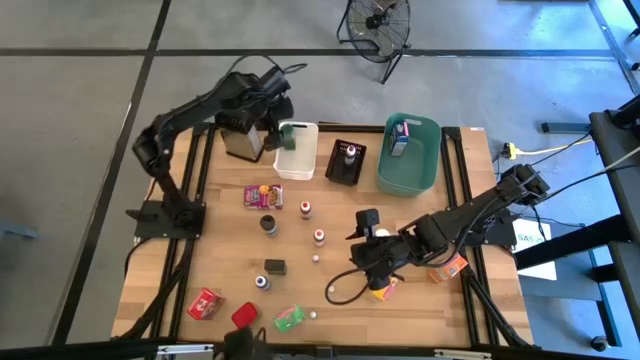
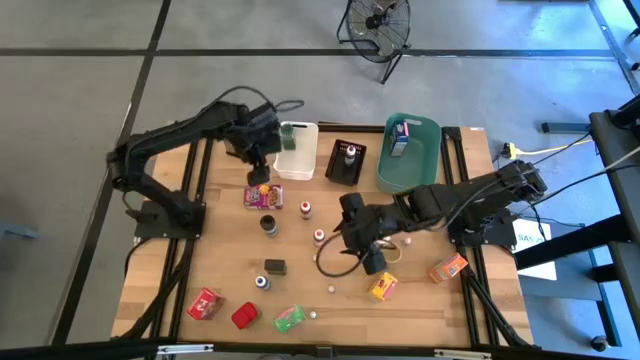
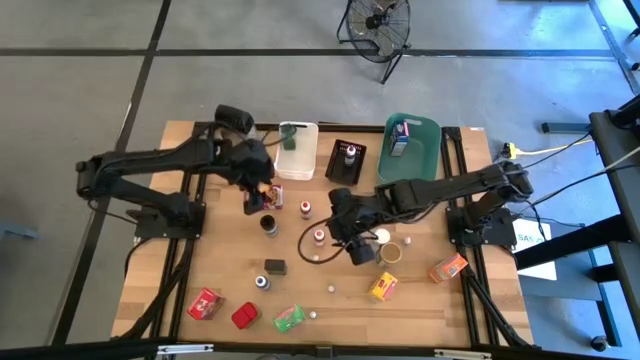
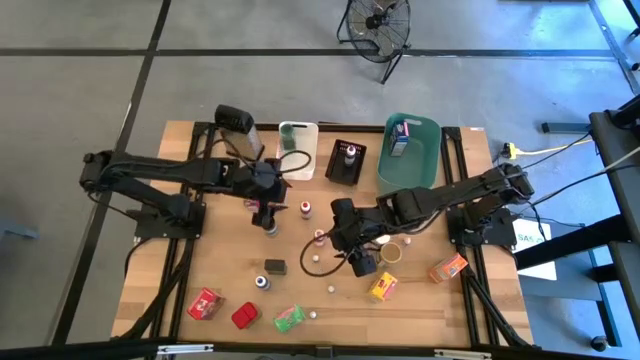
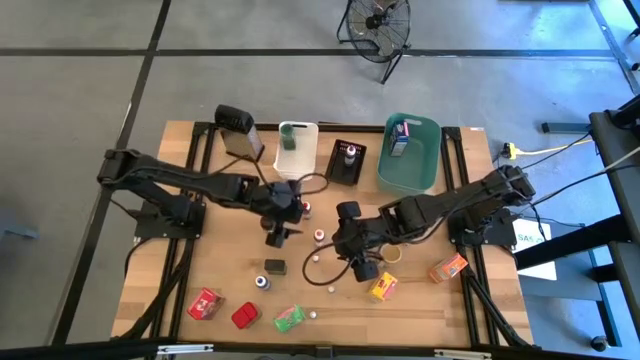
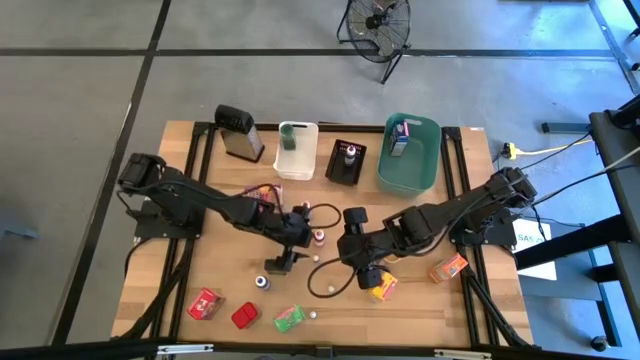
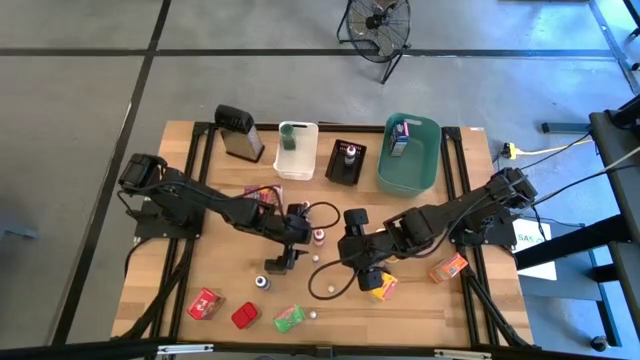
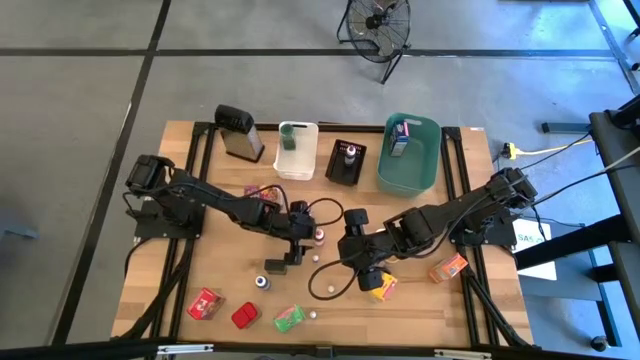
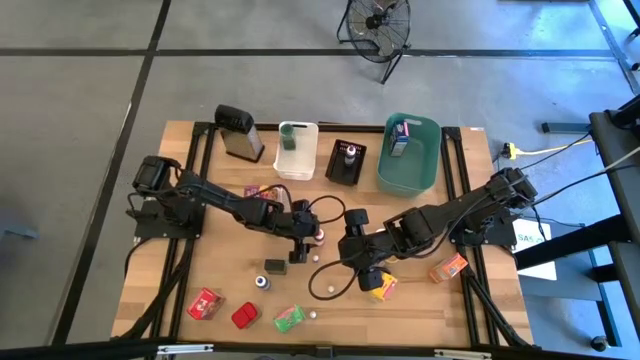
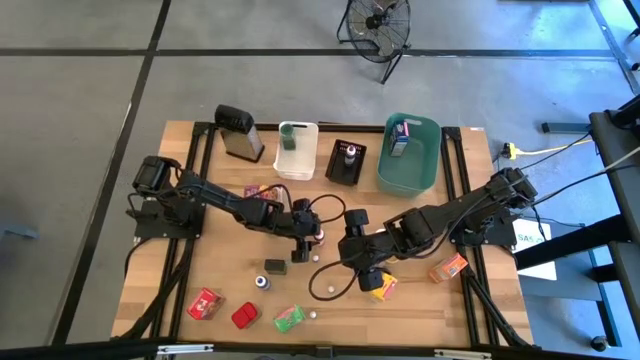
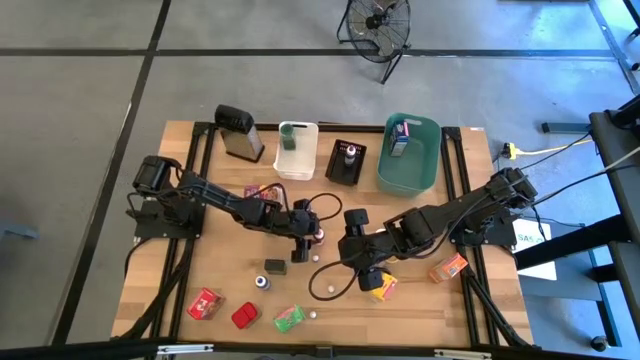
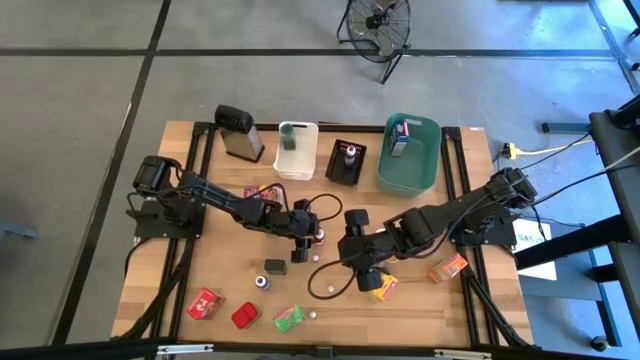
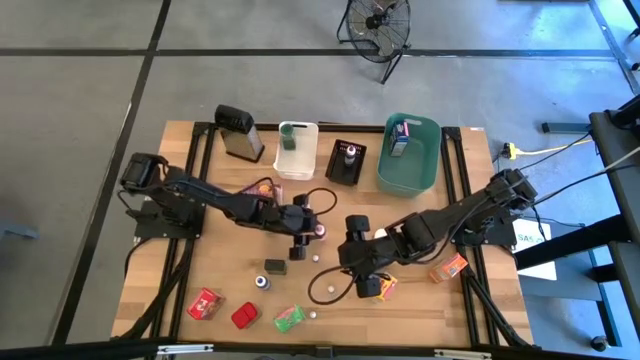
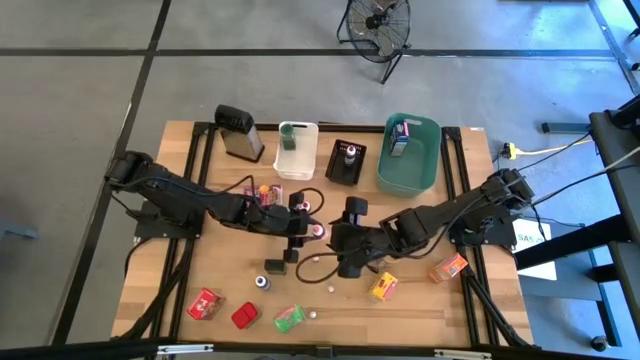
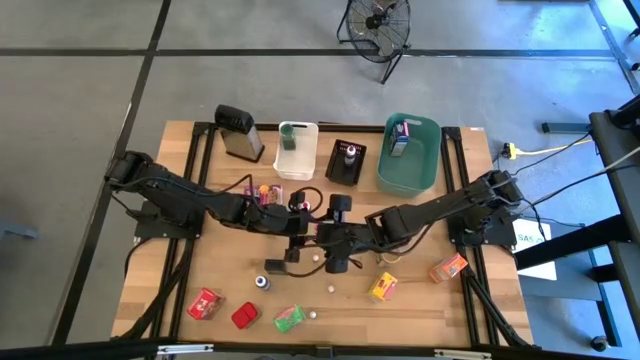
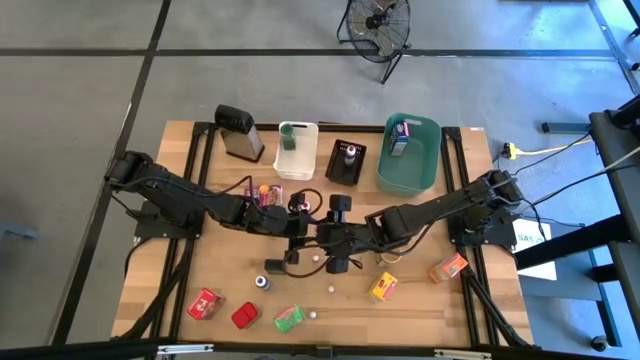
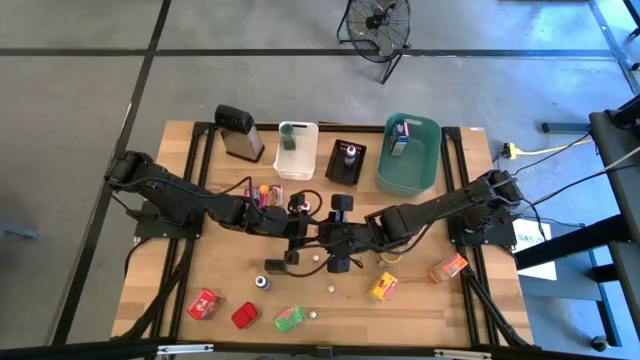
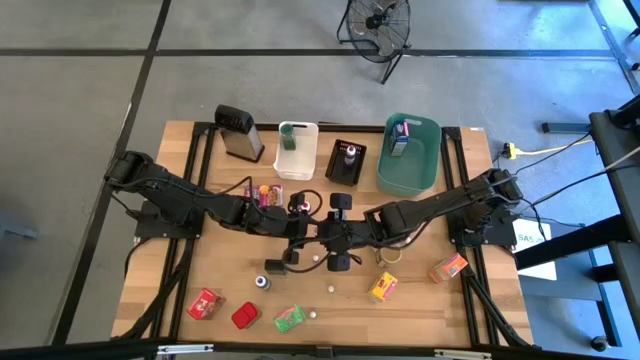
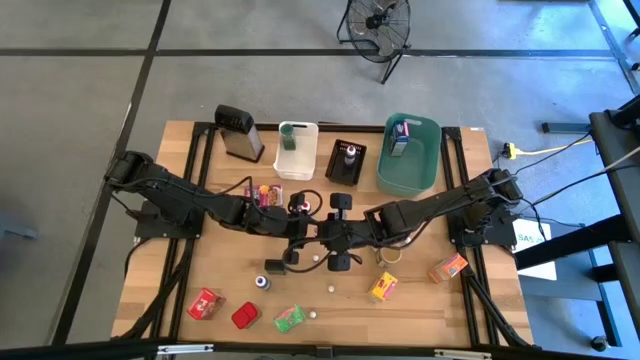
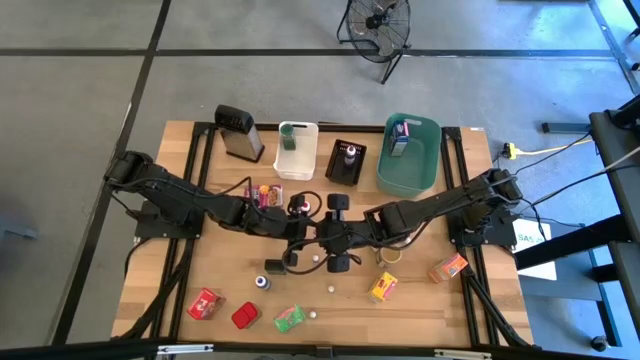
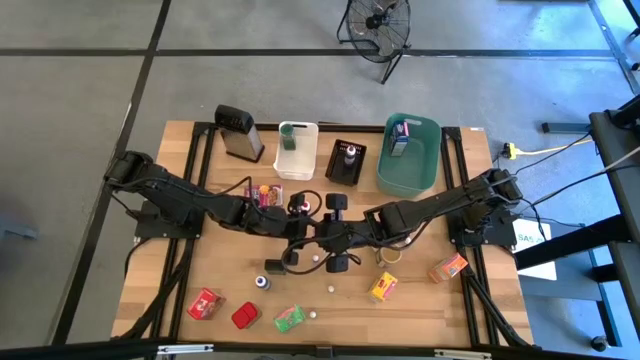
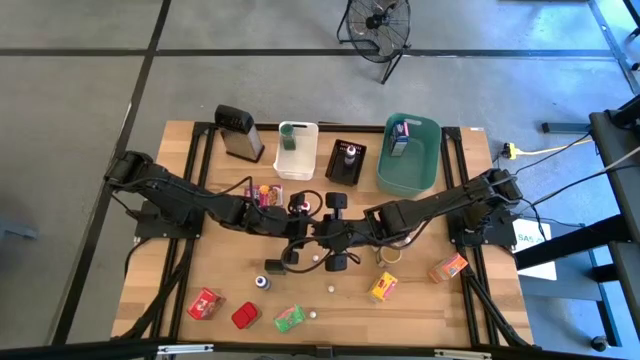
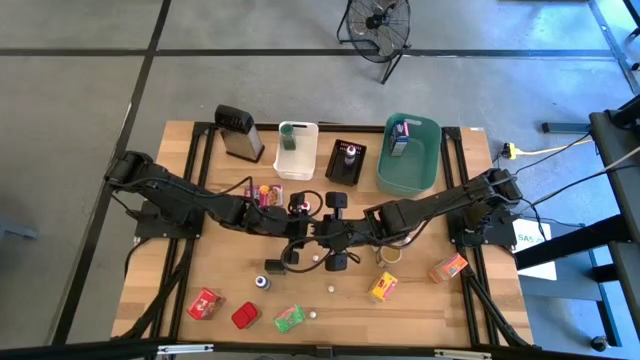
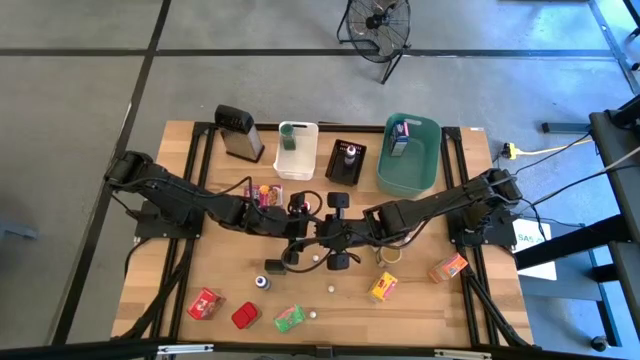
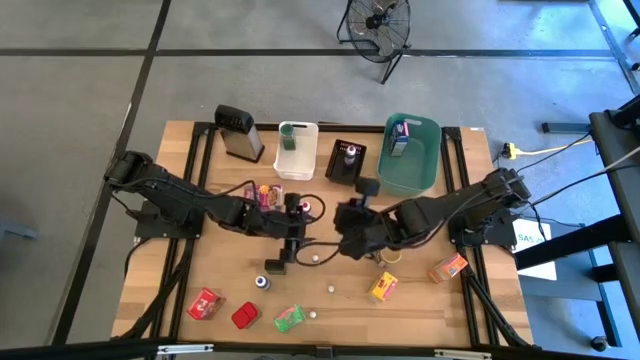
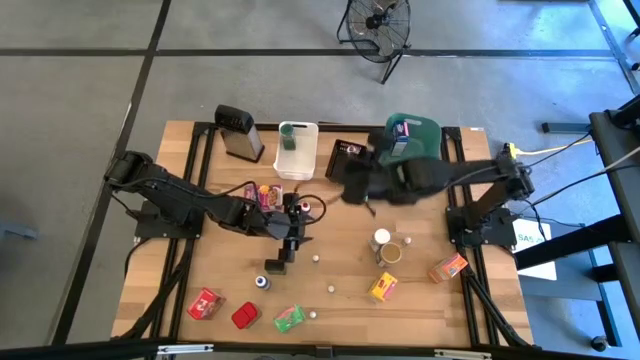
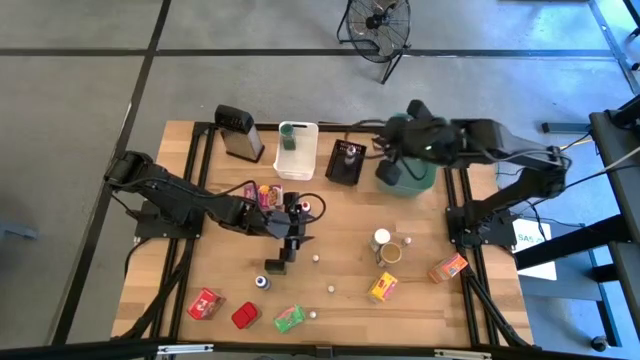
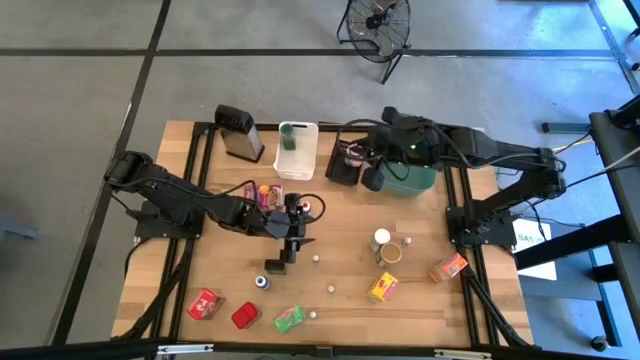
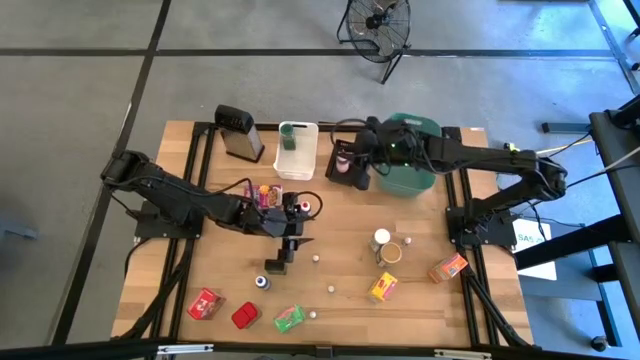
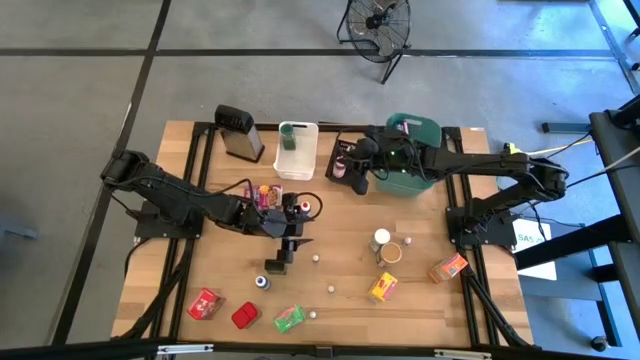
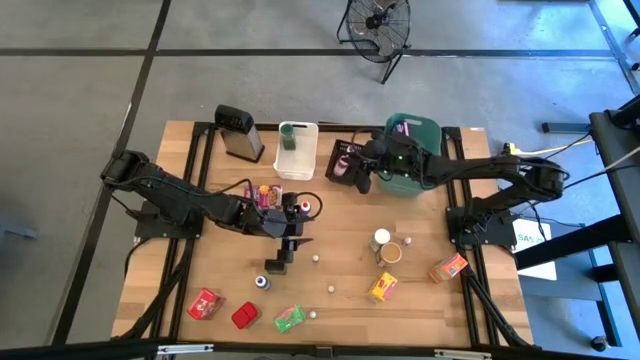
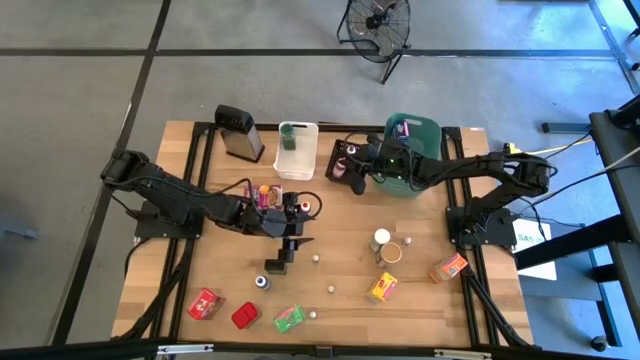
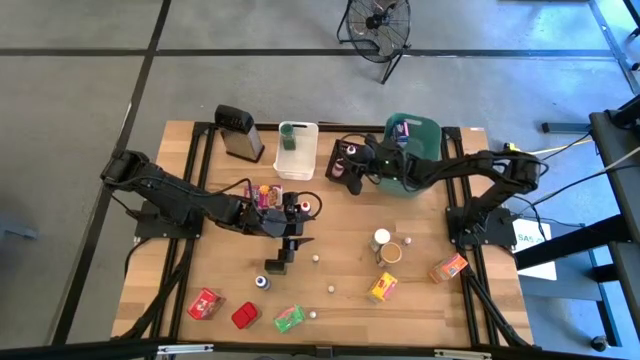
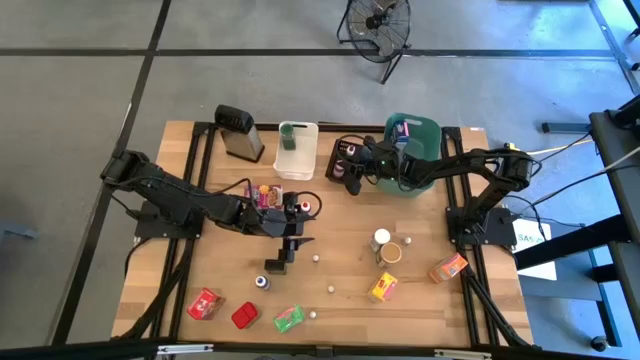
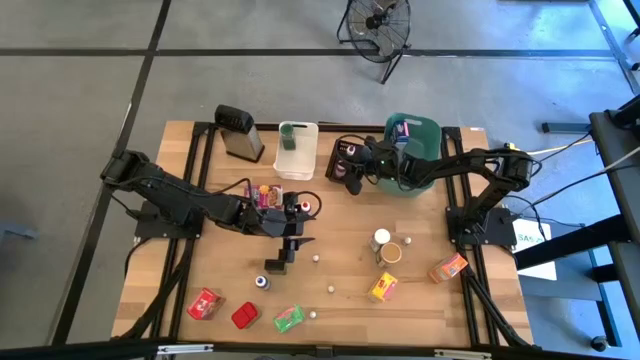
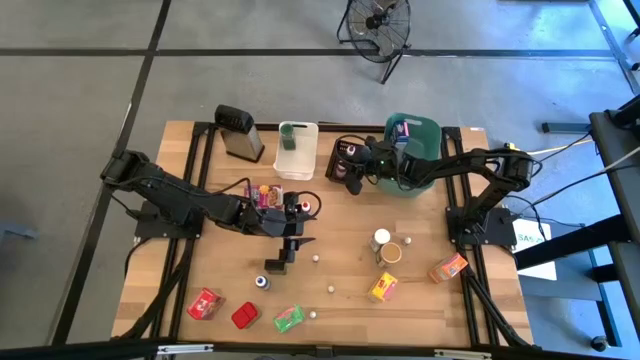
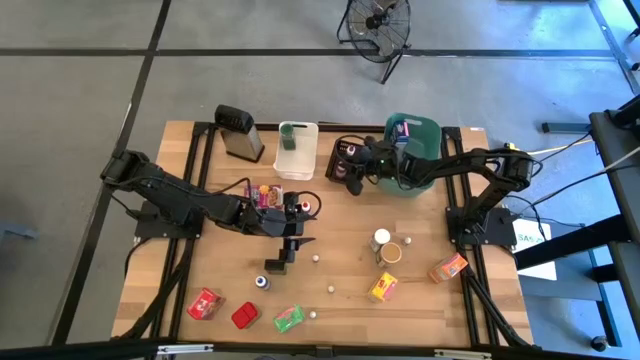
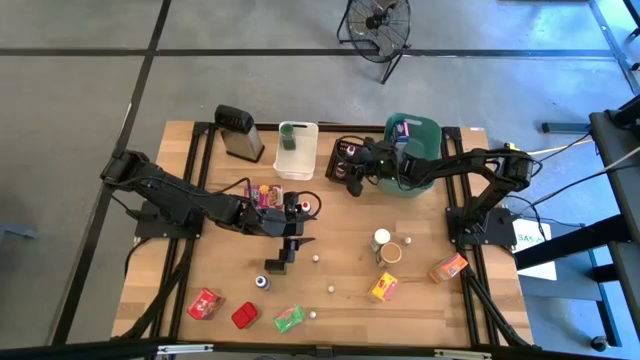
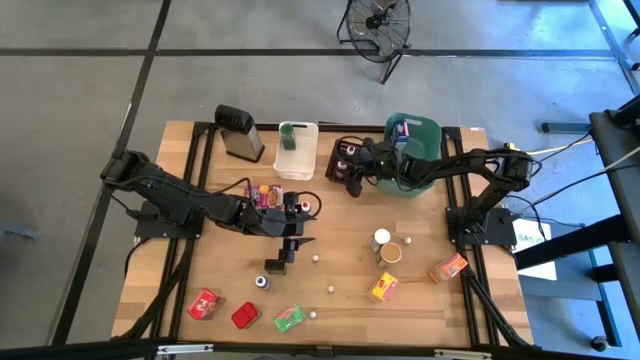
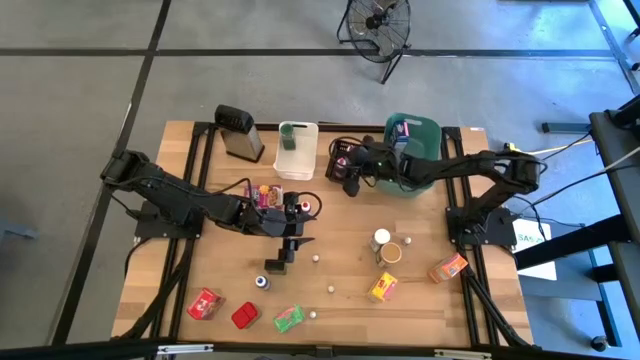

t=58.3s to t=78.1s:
Task: Pick & Place Kitchen Items
Put the large pink food coloring bottle into the black bin
